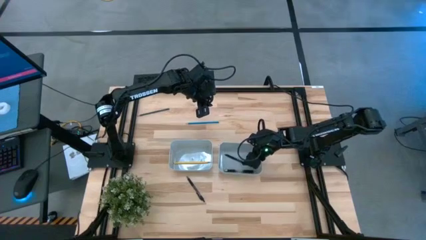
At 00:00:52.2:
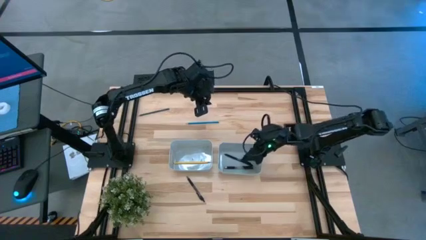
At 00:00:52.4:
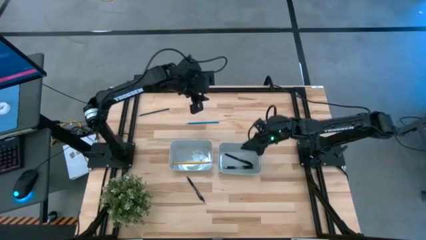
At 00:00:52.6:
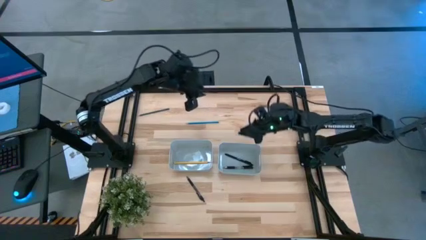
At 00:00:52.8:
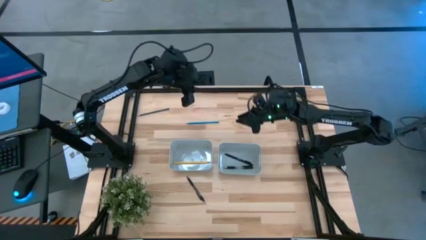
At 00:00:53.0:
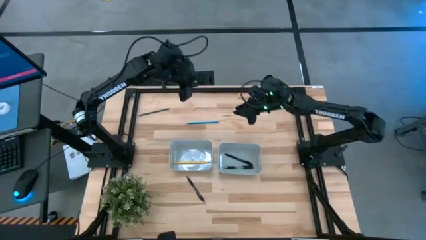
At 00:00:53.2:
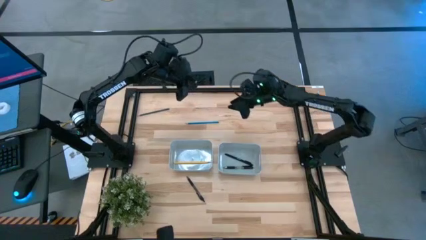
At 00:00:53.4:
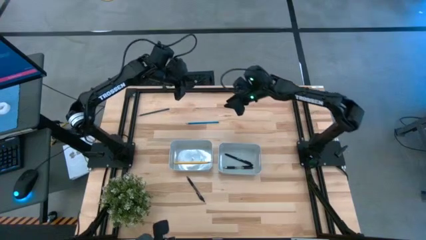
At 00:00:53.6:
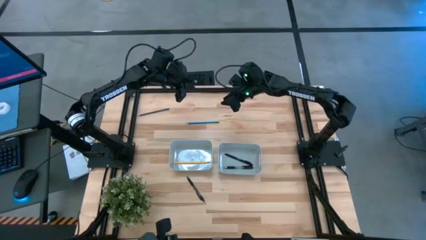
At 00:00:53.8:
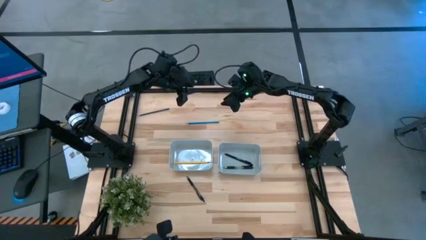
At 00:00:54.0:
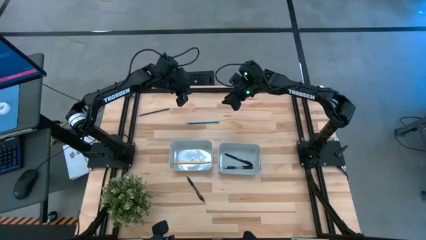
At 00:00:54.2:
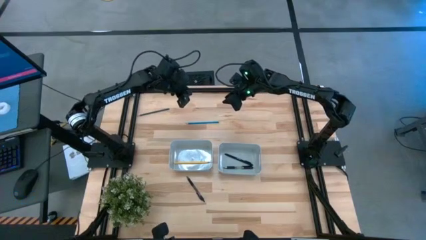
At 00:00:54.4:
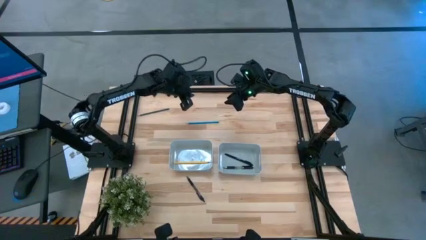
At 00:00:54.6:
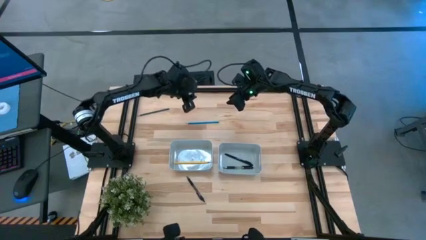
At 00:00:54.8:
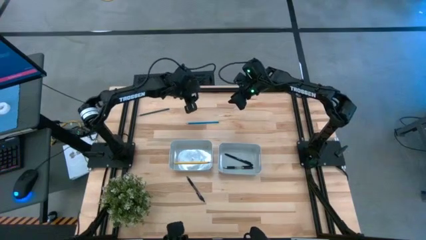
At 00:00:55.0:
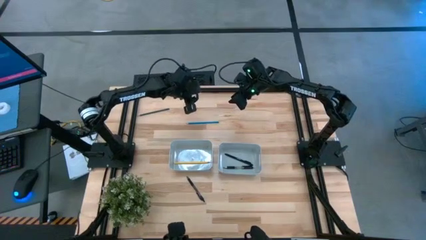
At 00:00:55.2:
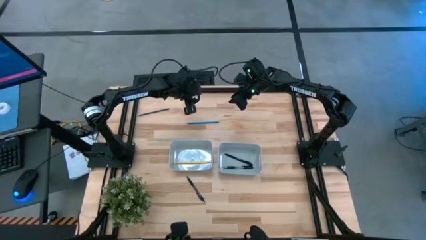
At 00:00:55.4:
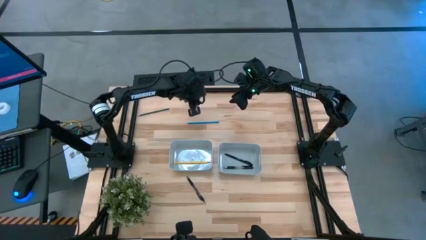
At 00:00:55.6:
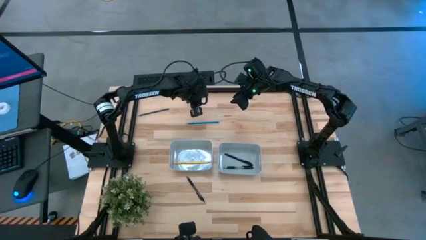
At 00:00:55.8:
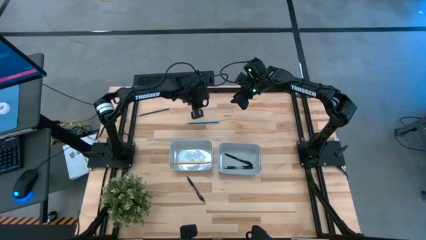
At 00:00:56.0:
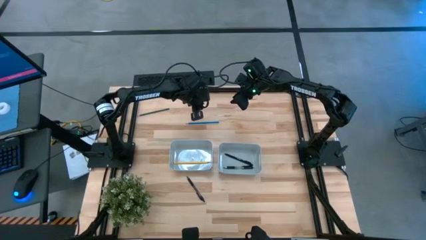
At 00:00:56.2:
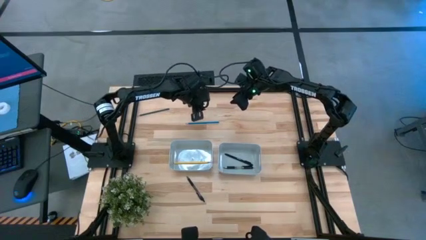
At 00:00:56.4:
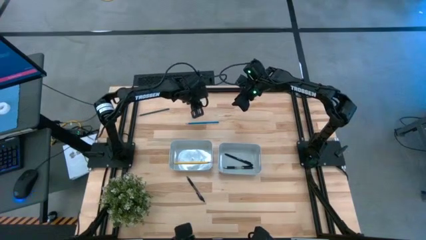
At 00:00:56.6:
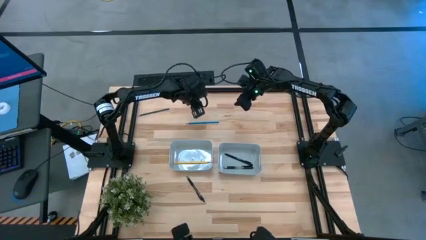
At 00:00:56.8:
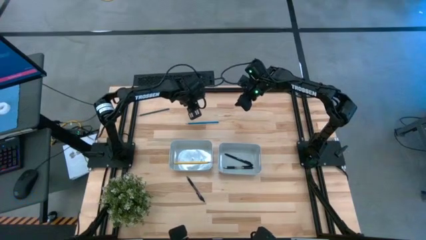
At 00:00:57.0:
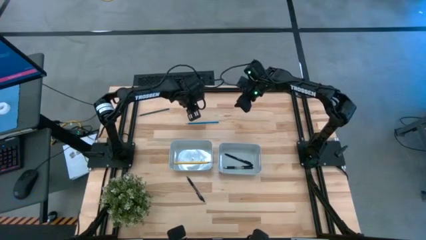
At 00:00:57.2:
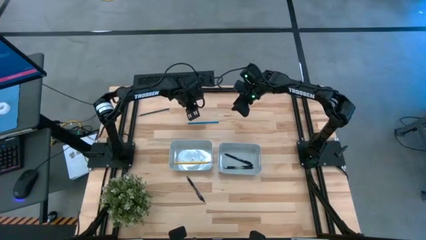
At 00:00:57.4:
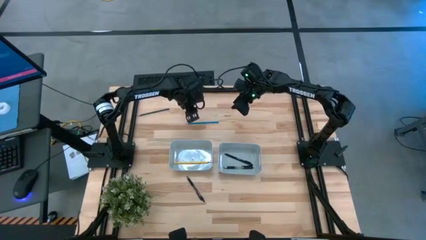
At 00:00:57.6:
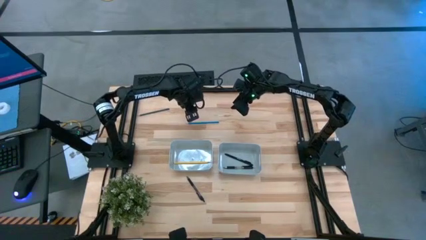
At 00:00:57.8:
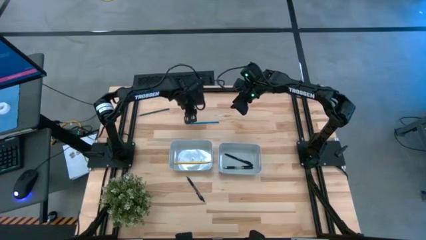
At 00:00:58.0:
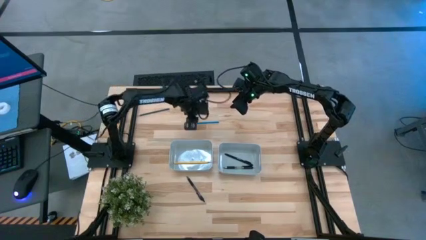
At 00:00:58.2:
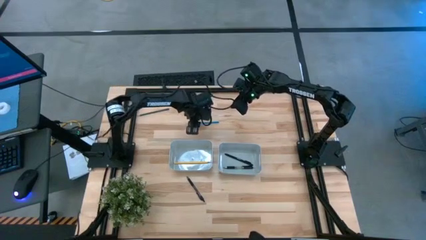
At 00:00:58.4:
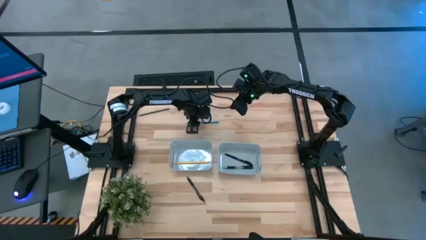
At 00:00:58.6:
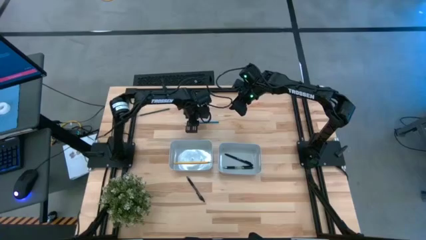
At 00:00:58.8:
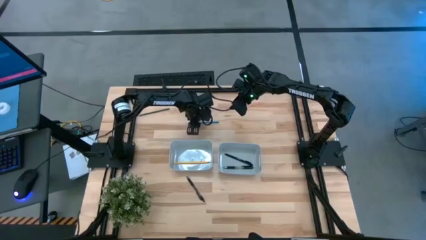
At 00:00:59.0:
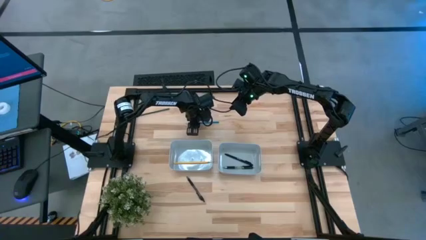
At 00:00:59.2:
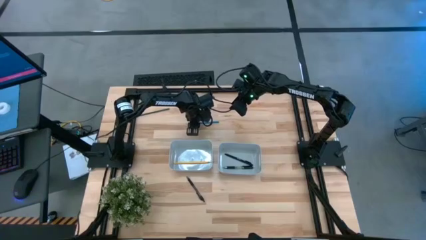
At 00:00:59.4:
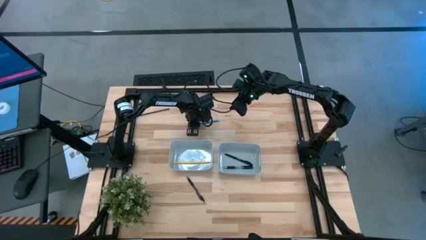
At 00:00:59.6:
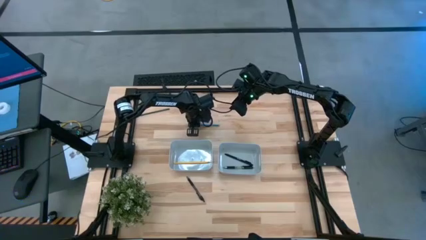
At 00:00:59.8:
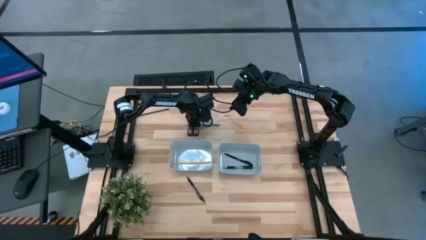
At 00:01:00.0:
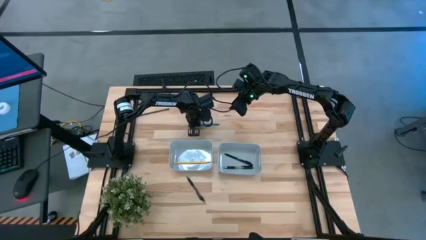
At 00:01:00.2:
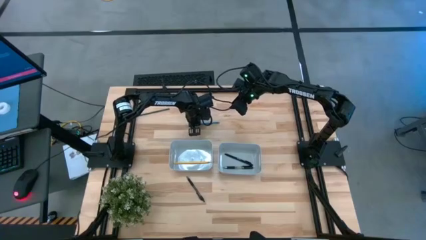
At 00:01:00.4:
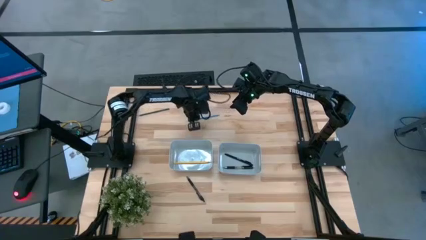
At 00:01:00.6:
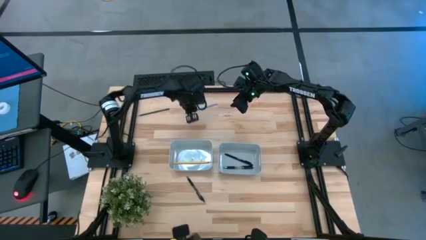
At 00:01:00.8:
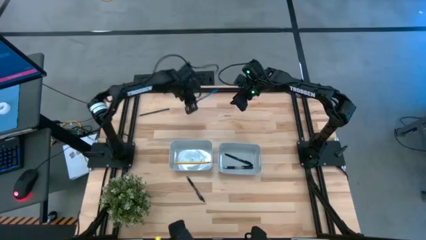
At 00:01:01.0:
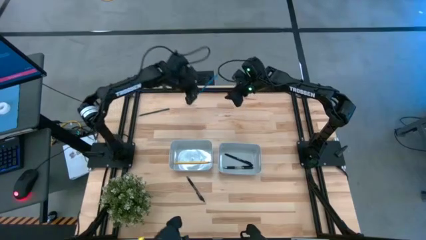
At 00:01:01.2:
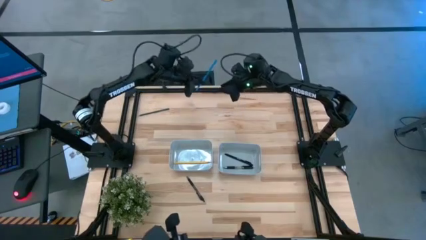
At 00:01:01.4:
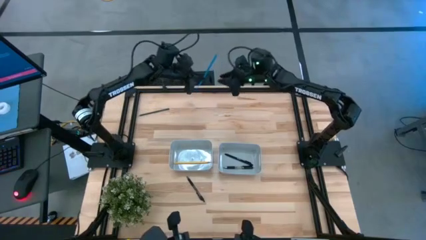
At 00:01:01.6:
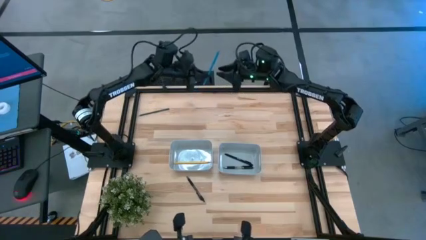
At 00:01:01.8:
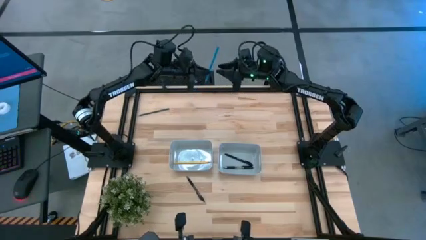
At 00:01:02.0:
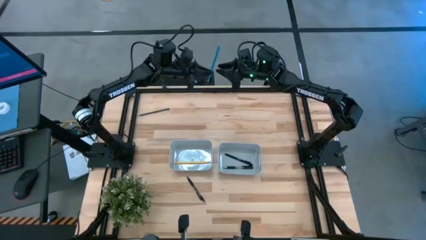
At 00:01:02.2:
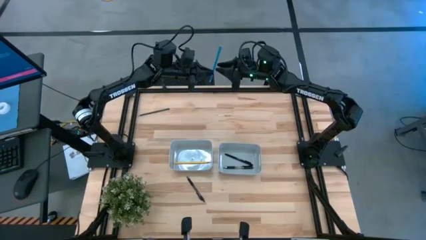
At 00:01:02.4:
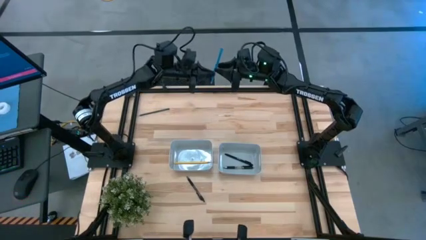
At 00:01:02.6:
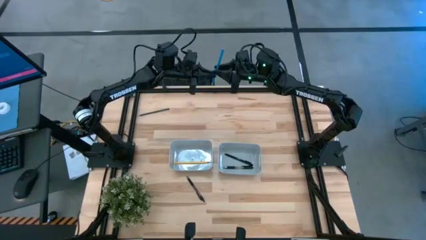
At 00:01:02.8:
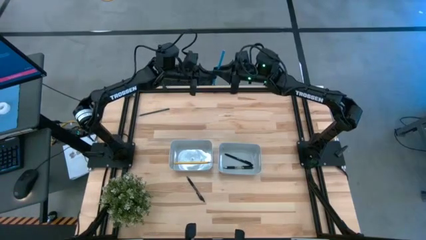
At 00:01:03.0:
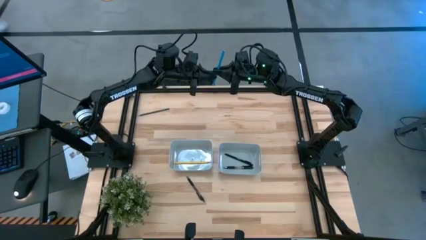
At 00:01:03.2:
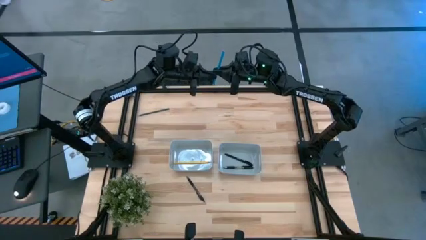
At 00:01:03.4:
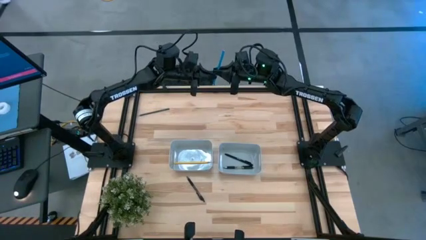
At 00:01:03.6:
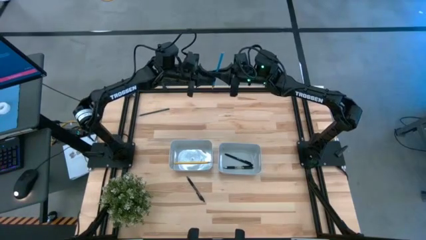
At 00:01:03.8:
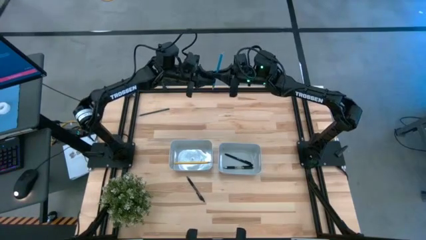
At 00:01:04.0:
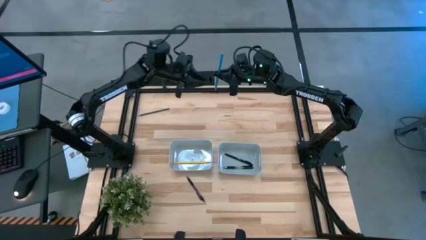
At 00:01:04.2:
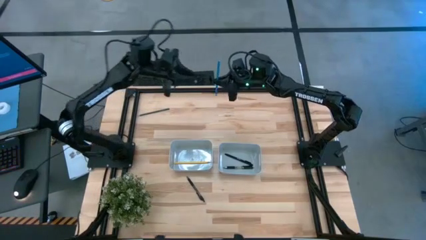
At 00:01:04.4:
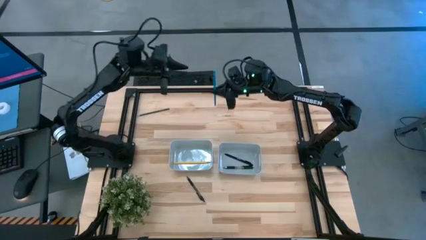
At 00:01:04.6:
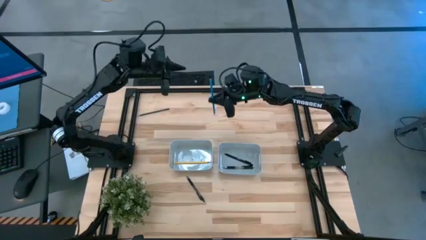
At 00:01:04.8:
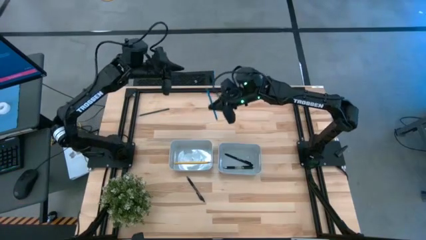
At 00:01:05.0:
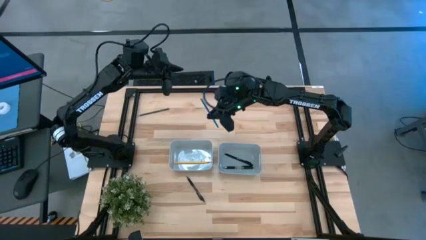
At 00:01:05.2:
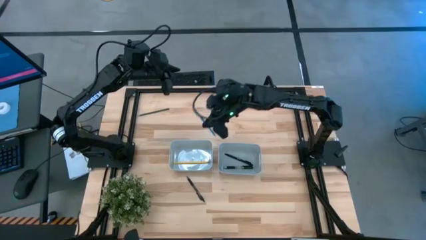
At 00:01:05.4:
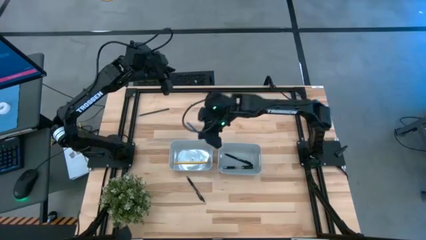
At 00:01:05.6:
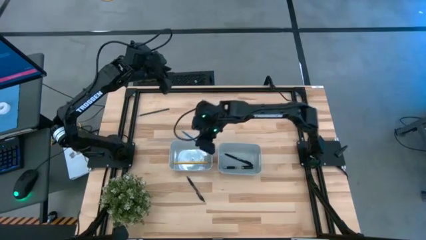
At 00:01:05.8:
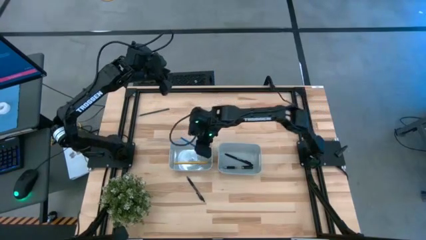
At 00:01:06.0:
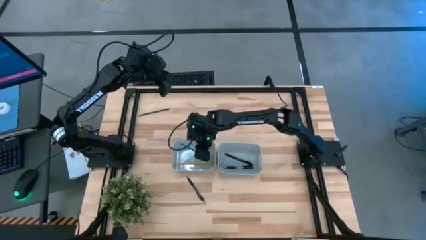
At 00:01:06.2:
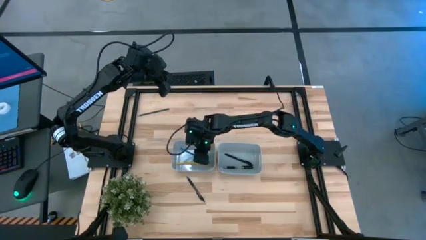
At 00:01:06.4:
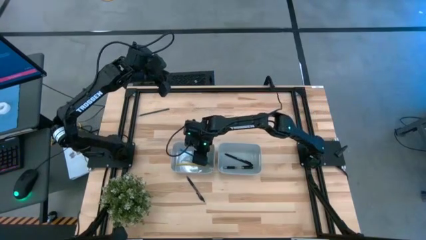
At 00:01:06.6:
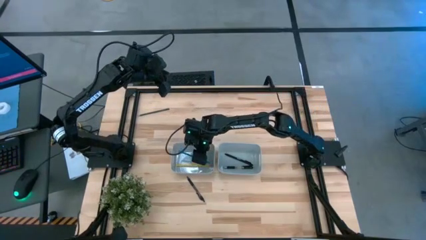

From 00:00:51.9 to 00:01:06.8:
Task: Sort pens & pencils
Put the blue pencil into the left gray bin
